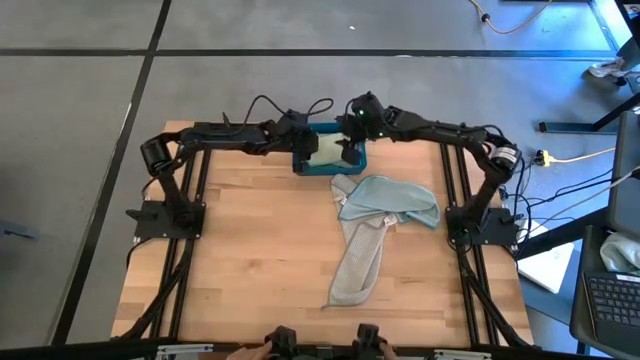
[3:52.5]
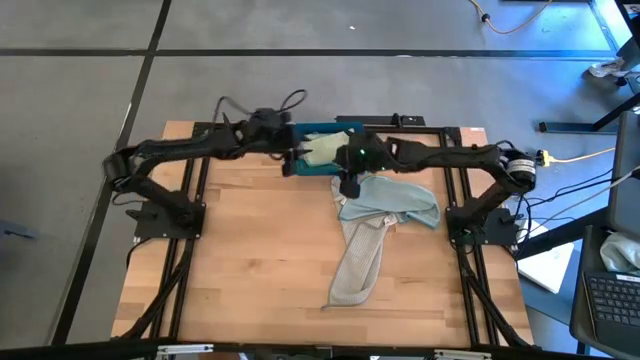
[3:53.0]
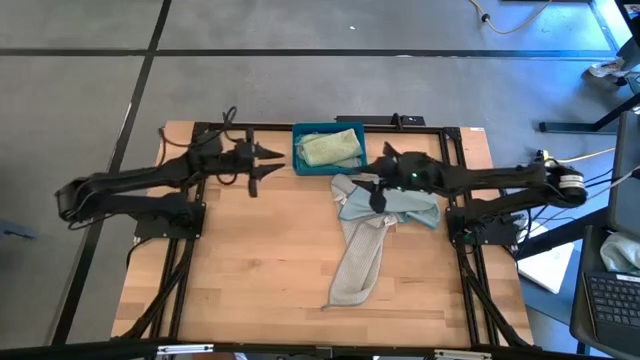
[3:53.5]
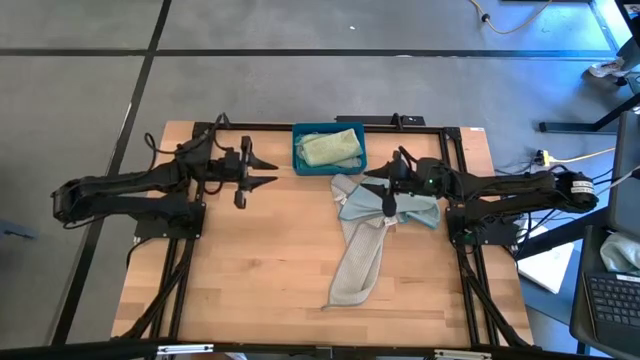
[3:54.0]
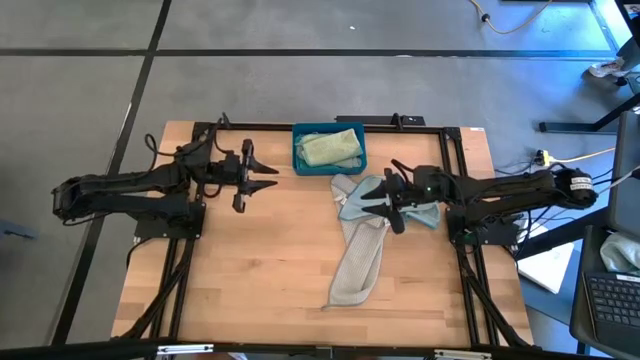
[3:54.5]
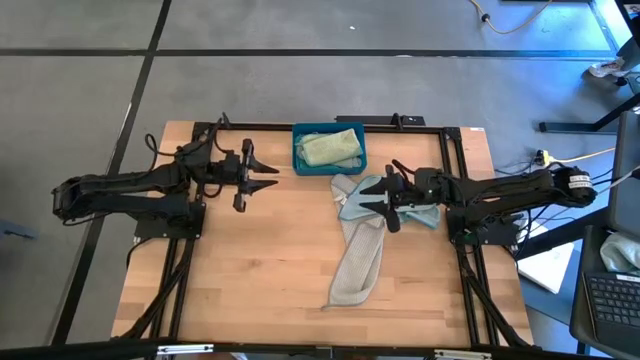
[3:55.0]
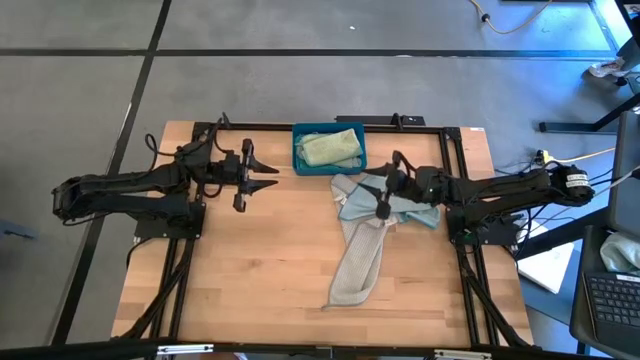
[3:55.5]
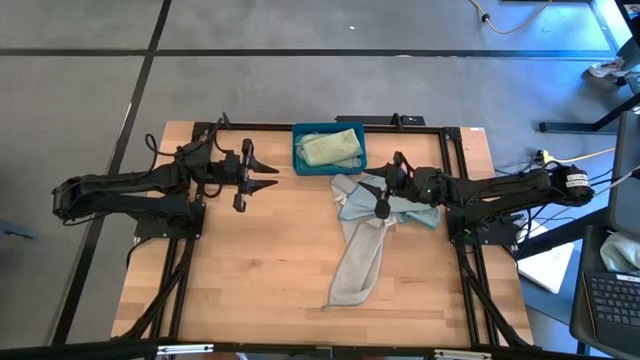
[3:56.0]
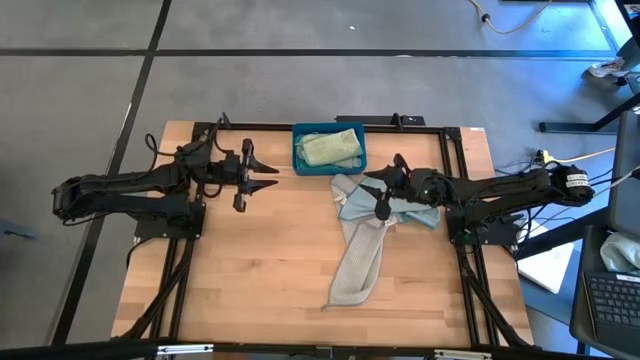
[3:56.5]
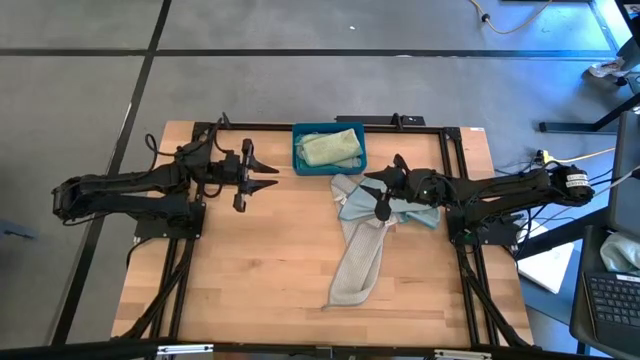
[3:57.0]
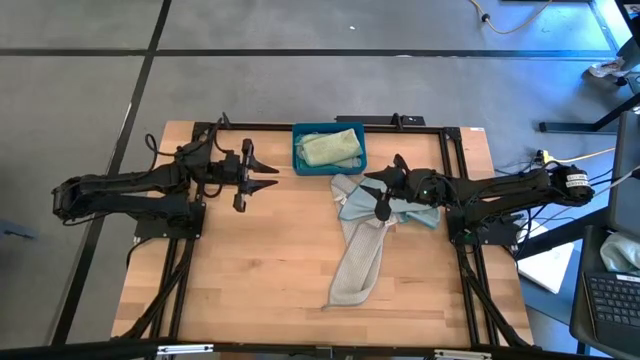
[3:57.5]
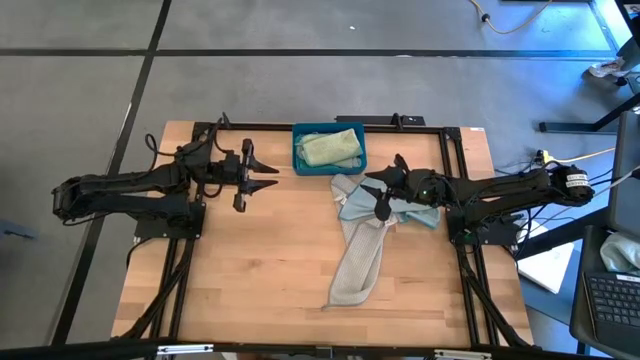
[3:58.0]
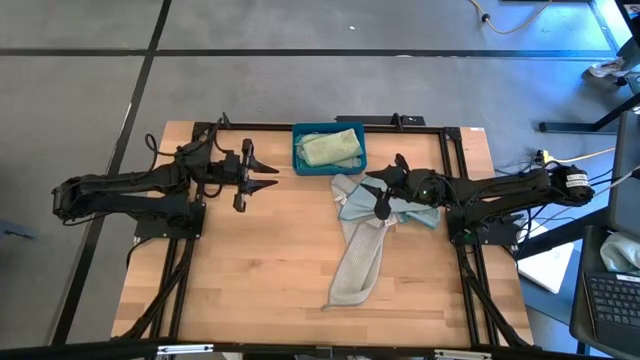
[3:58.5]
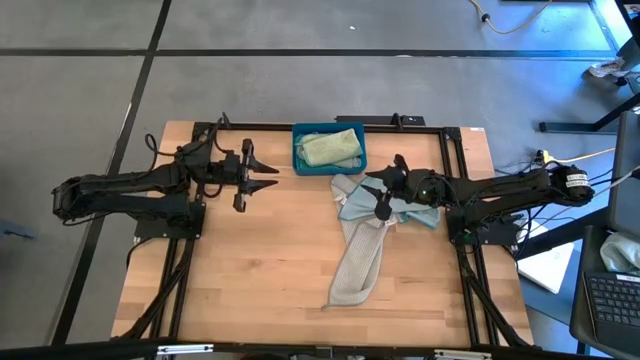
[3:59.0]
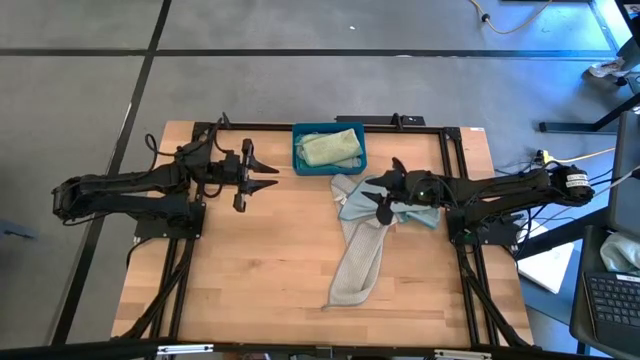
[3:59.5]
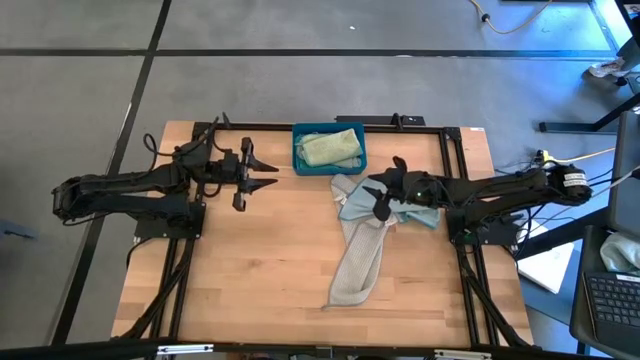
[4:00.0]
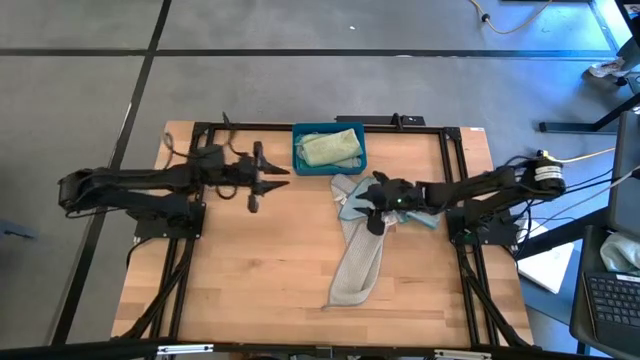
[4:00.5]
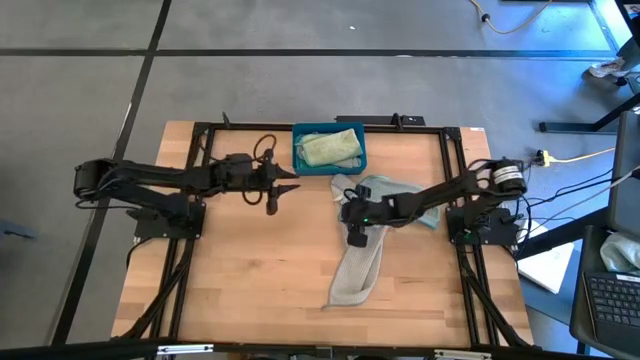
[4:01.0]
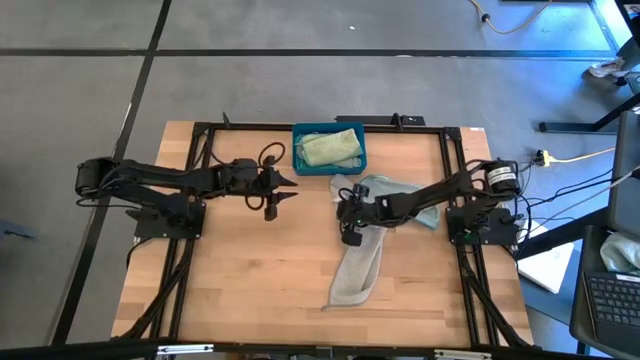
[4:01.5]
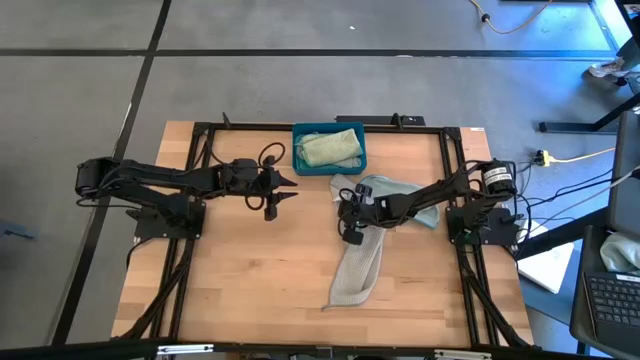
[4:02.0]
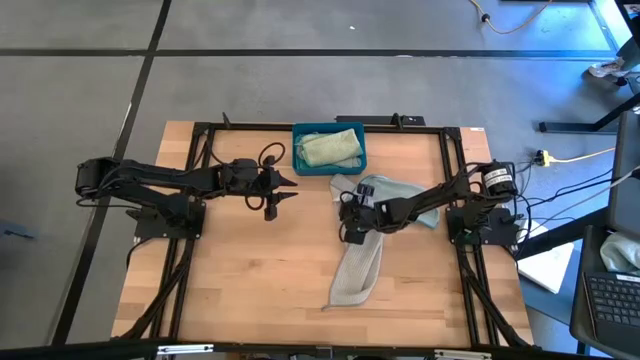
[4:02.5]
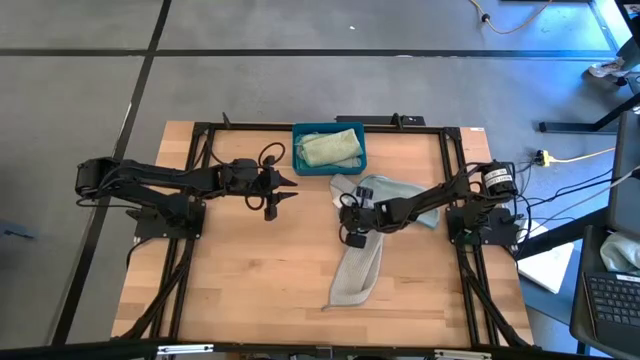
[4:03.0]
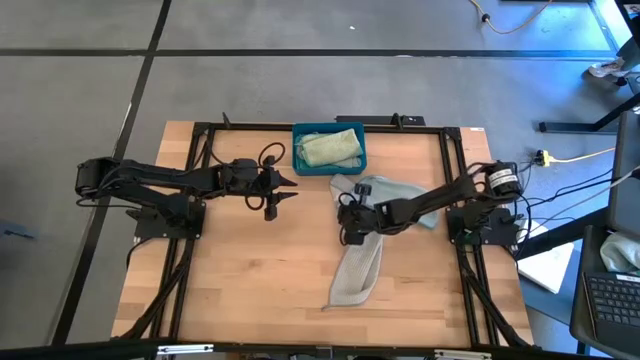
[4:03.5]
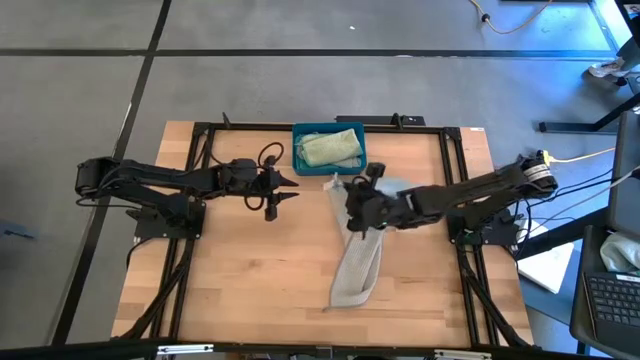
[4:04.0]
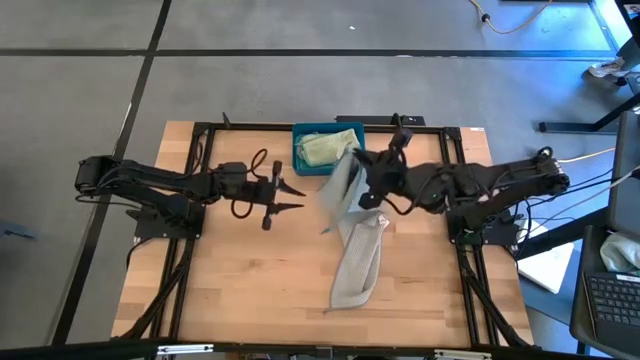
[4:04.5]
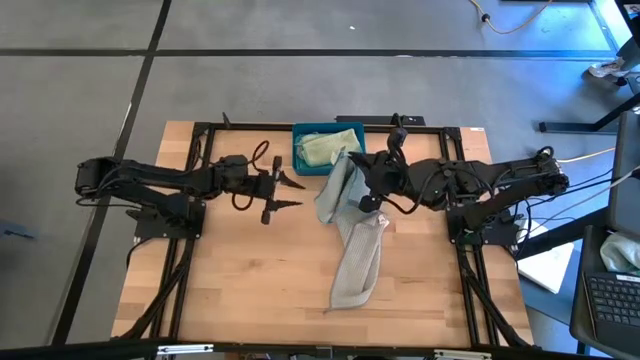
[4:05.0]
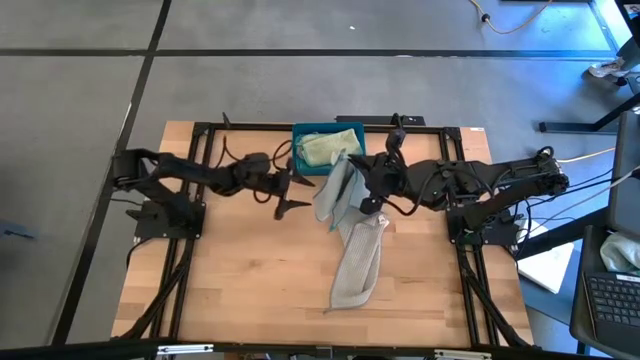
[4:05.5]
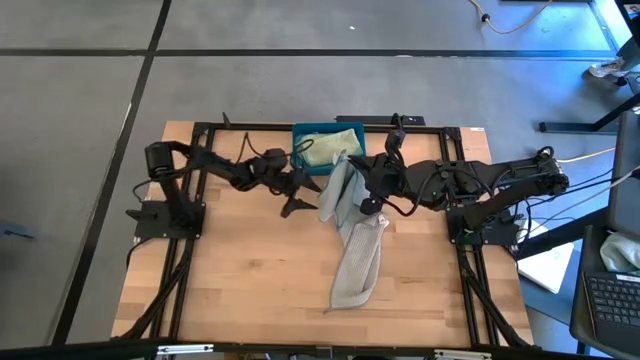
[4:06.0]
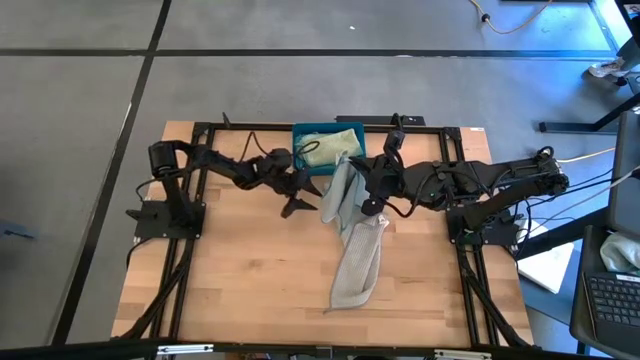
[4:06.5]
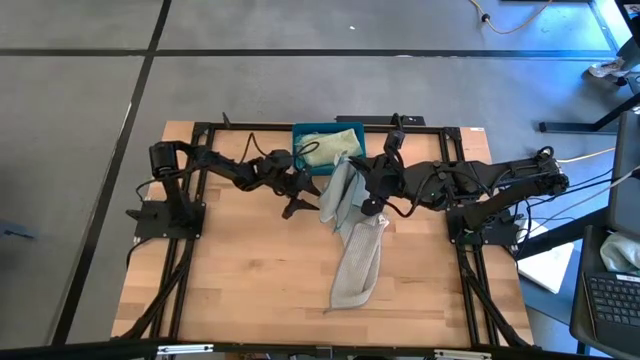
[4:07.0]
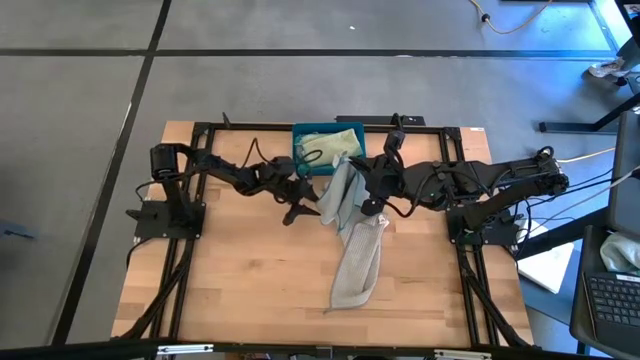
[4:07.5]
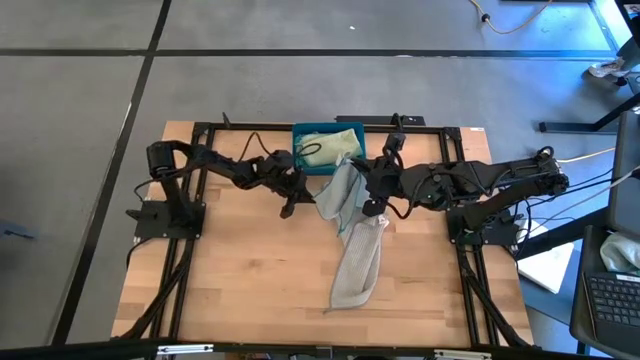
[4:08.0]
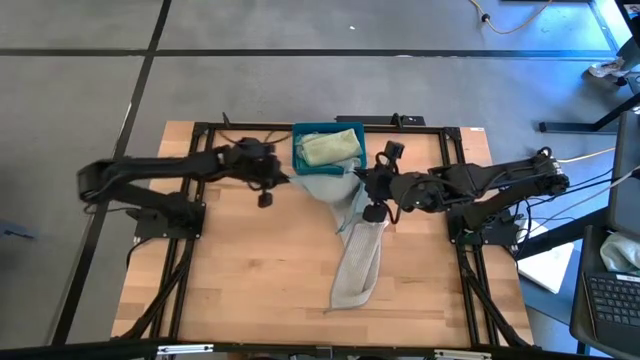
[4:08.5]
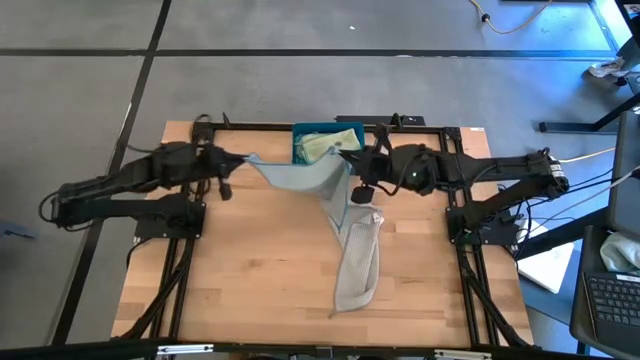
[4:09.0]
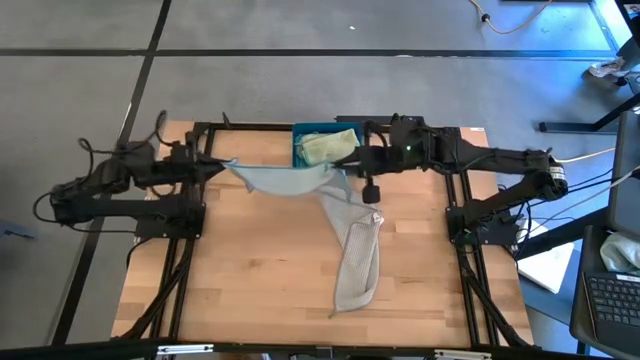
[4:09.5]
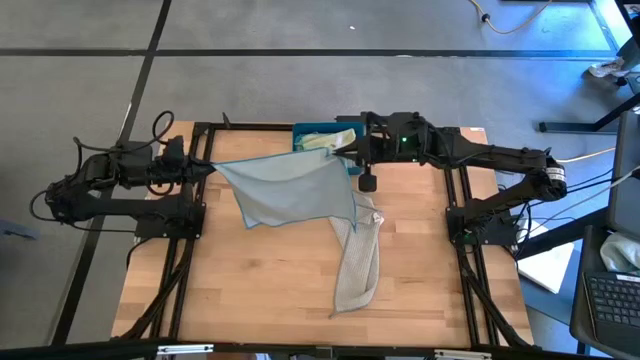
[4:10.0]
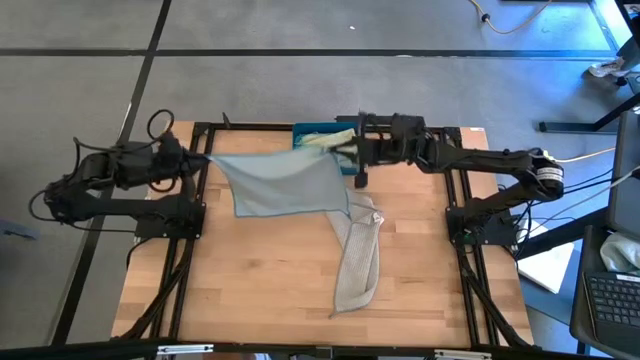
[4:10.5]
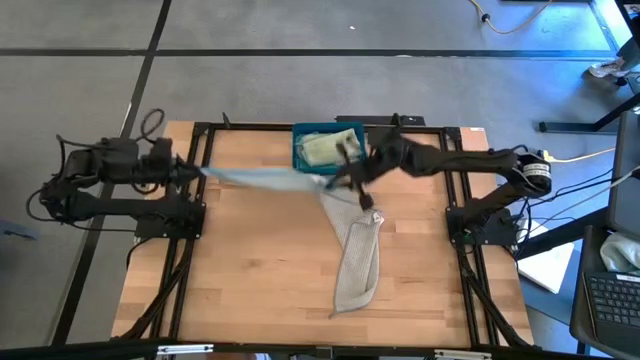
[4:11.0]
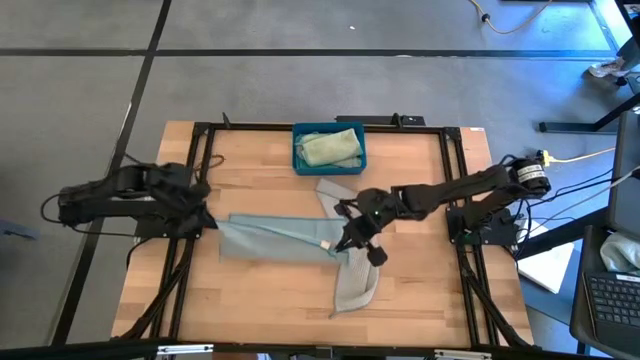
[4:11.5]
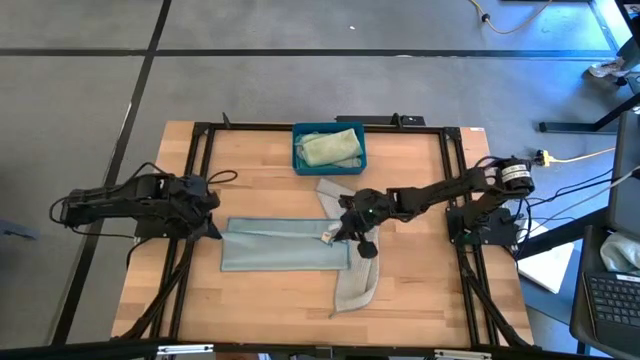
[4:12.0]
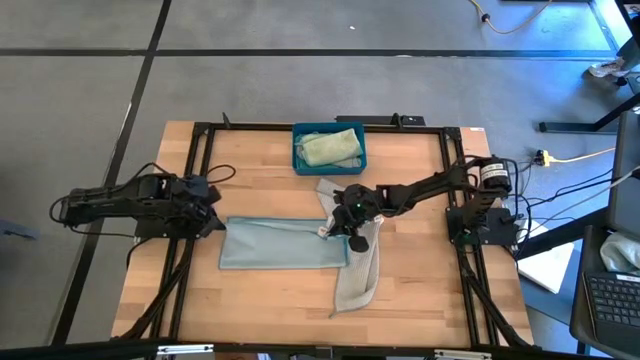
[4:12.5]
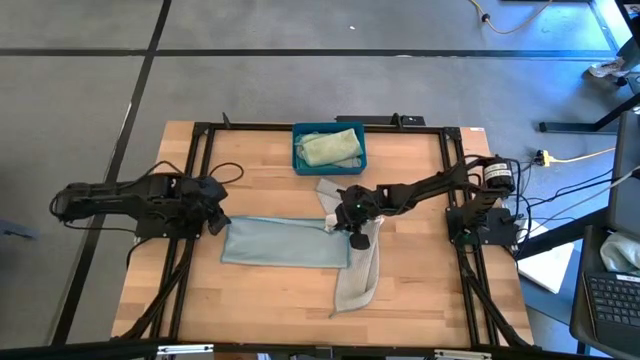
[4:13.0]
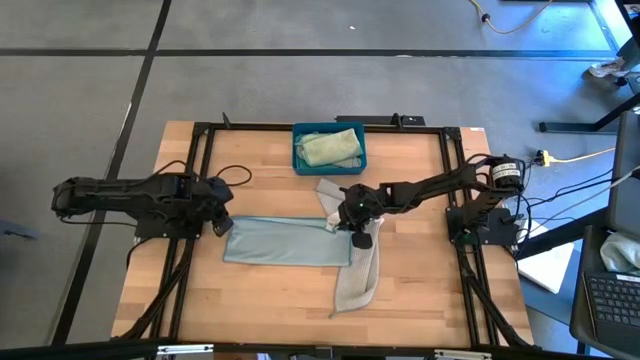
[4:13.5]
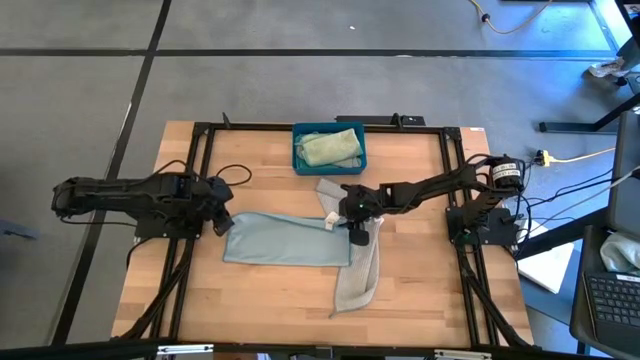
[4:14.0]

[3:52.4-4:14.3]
Task: Fold microfiber towels
Fold the light blue towel
